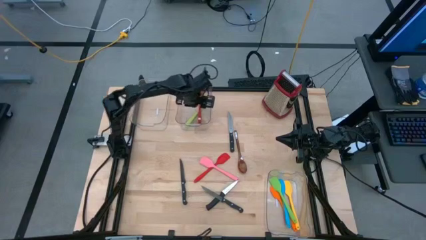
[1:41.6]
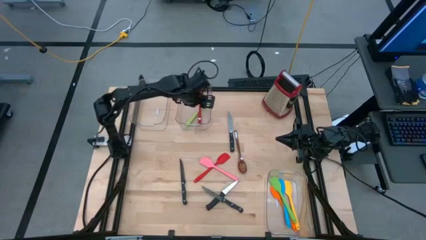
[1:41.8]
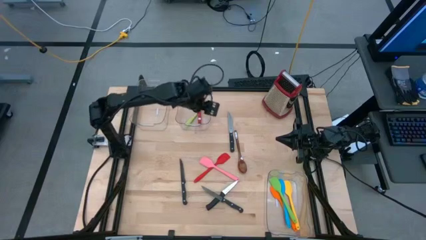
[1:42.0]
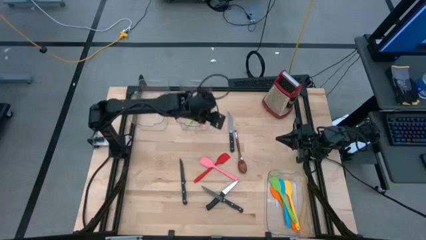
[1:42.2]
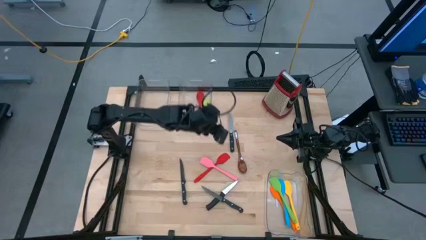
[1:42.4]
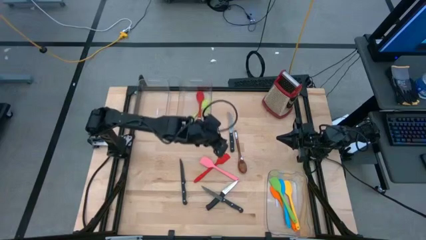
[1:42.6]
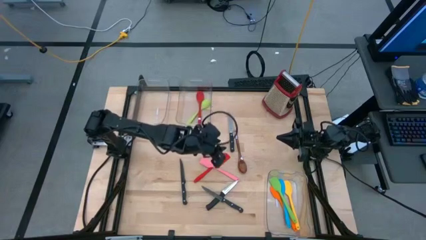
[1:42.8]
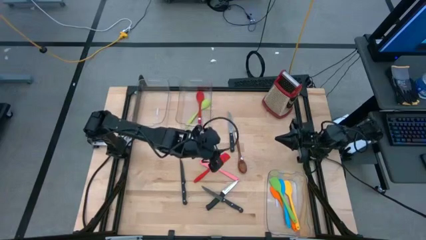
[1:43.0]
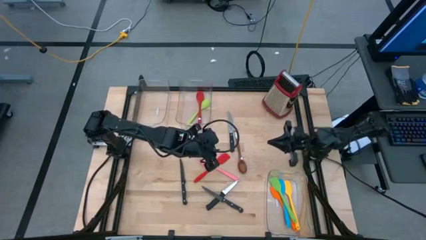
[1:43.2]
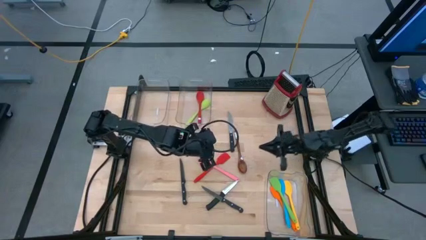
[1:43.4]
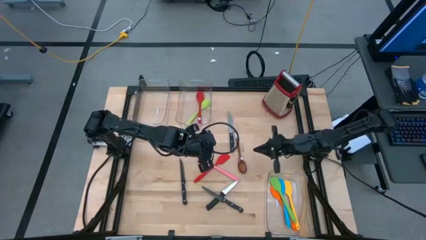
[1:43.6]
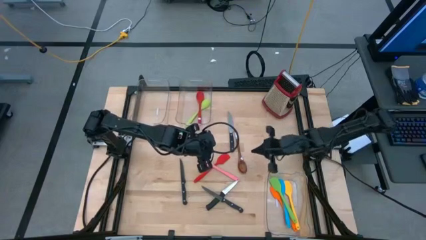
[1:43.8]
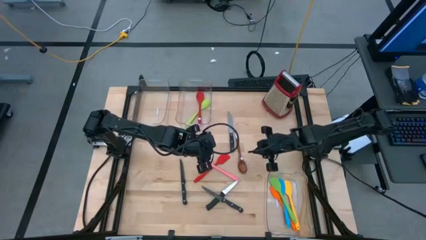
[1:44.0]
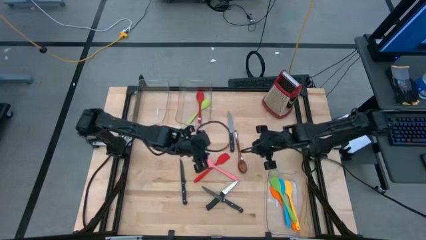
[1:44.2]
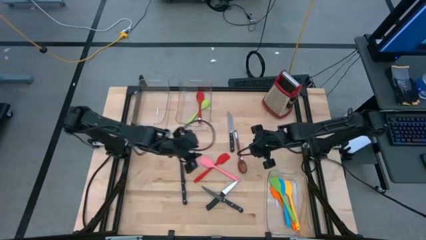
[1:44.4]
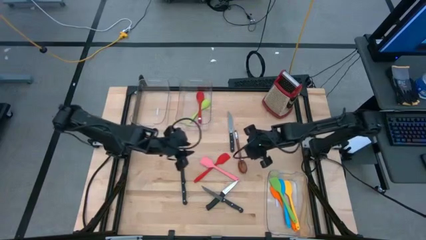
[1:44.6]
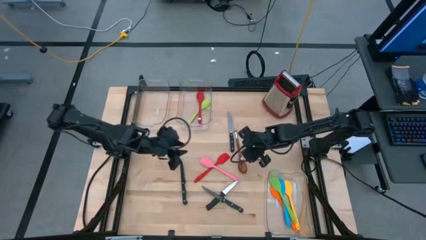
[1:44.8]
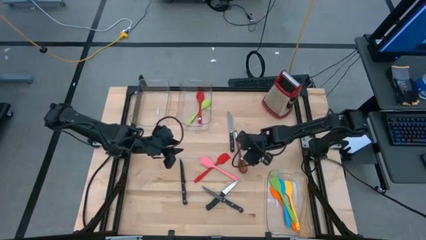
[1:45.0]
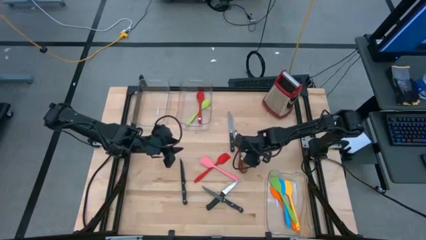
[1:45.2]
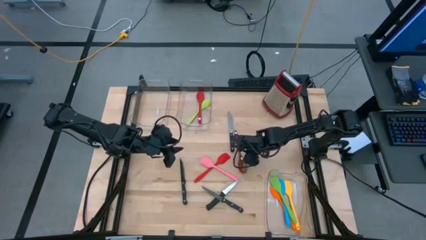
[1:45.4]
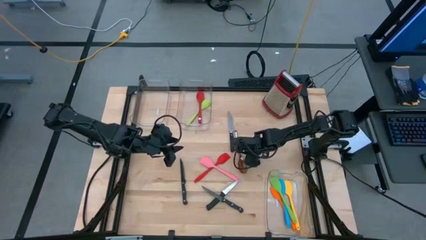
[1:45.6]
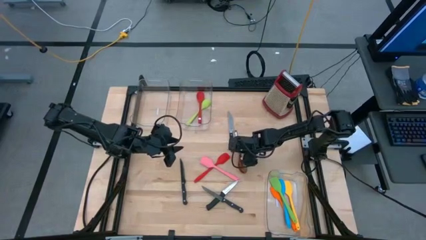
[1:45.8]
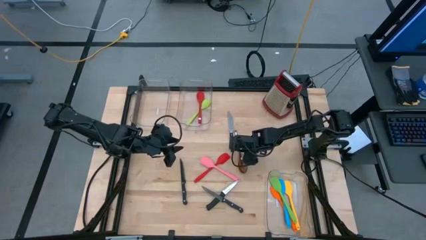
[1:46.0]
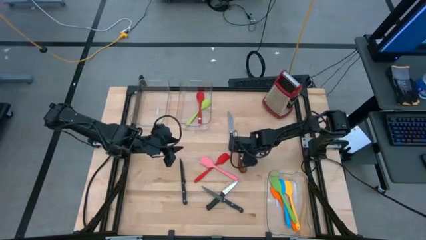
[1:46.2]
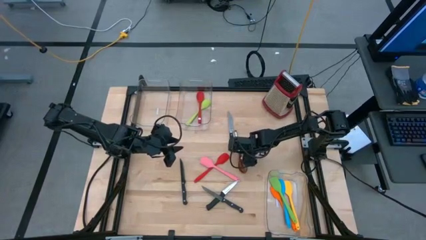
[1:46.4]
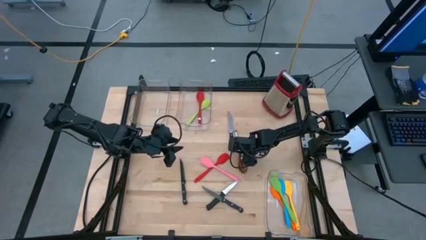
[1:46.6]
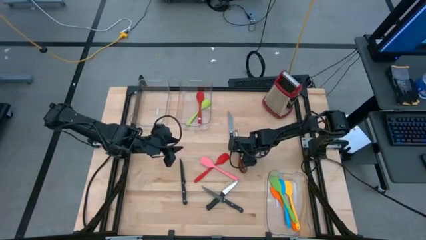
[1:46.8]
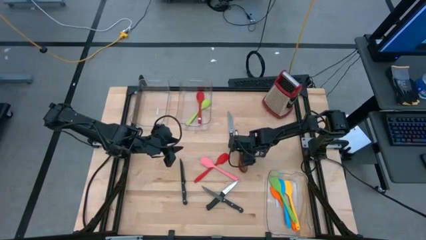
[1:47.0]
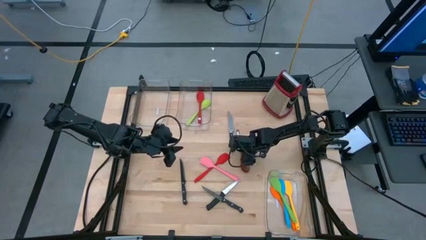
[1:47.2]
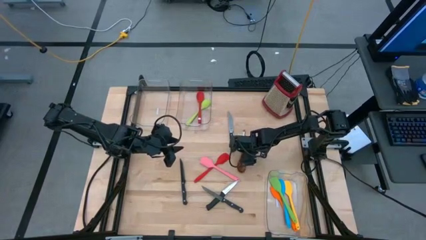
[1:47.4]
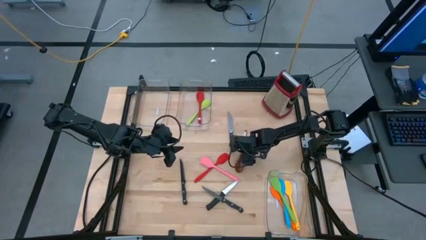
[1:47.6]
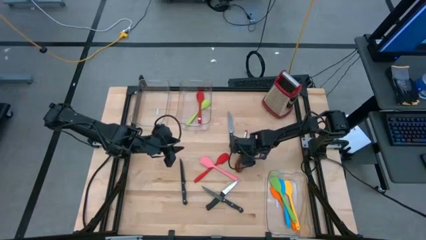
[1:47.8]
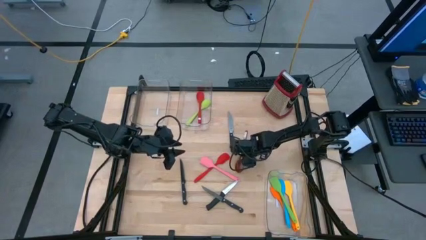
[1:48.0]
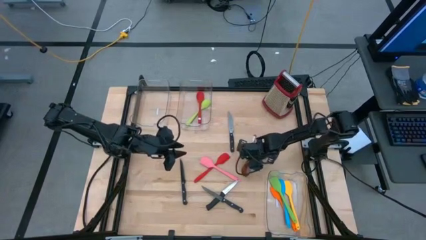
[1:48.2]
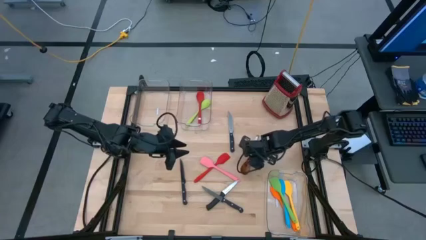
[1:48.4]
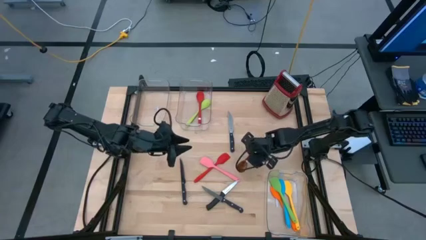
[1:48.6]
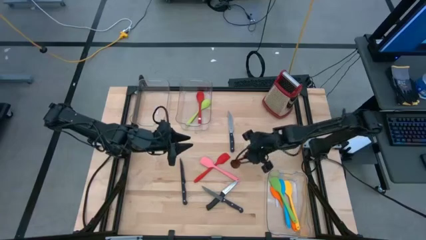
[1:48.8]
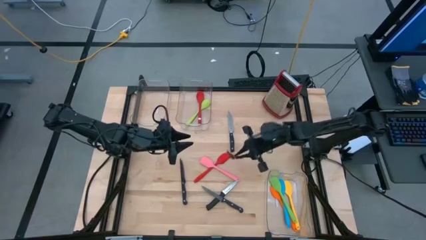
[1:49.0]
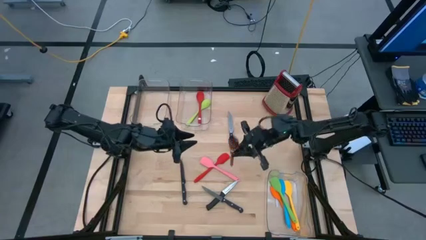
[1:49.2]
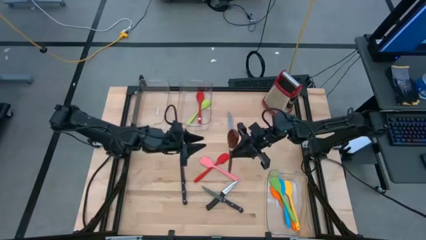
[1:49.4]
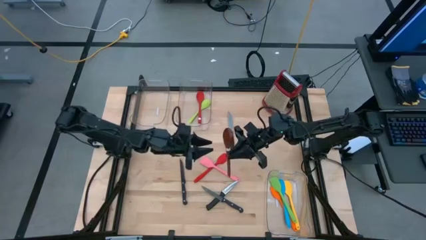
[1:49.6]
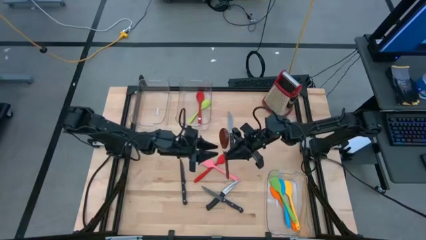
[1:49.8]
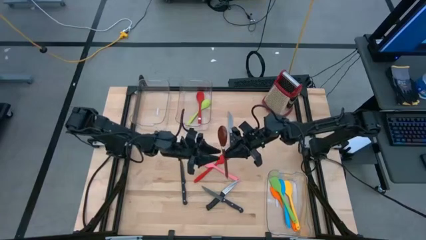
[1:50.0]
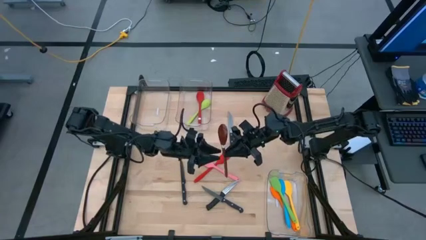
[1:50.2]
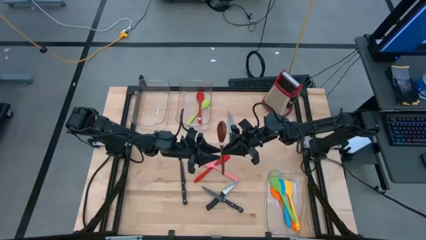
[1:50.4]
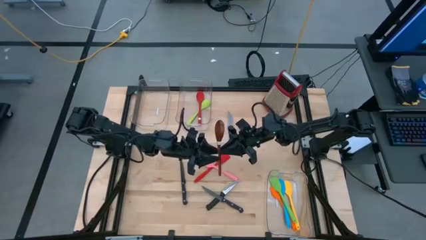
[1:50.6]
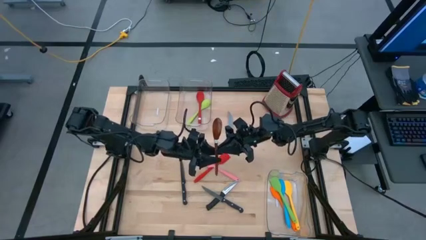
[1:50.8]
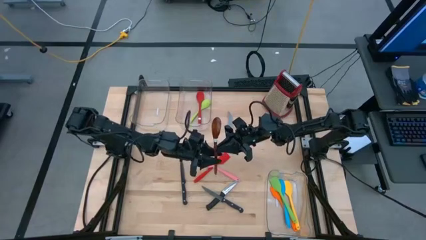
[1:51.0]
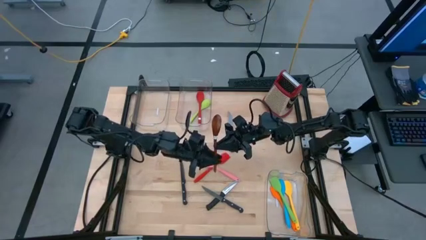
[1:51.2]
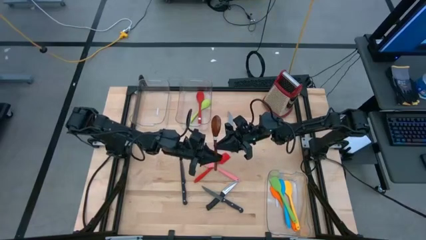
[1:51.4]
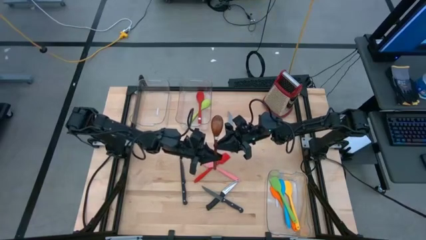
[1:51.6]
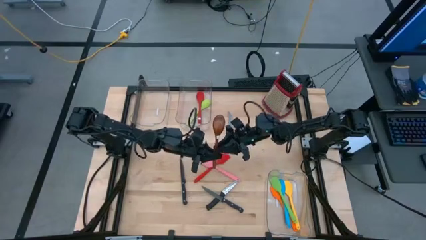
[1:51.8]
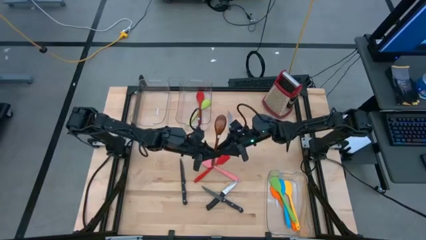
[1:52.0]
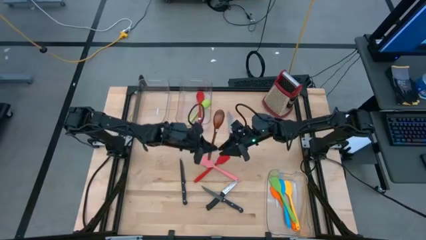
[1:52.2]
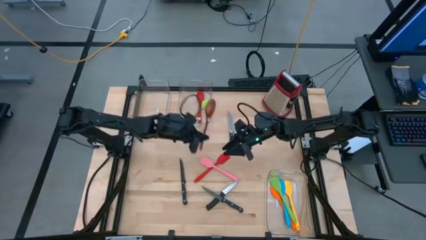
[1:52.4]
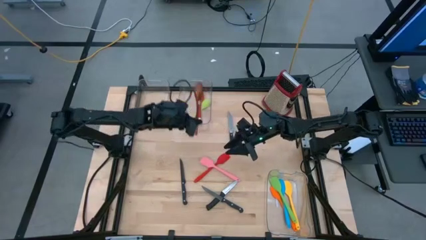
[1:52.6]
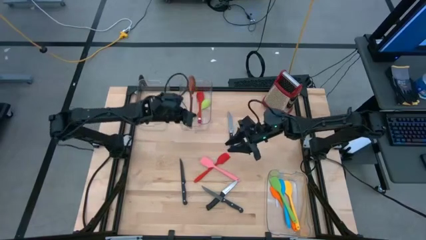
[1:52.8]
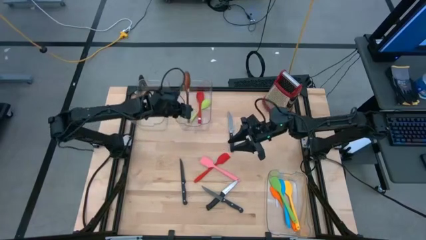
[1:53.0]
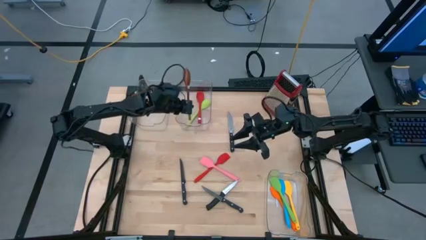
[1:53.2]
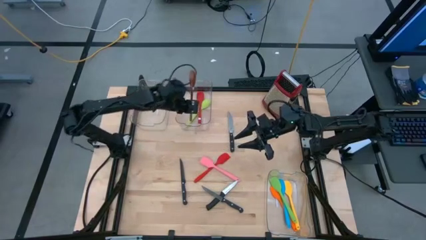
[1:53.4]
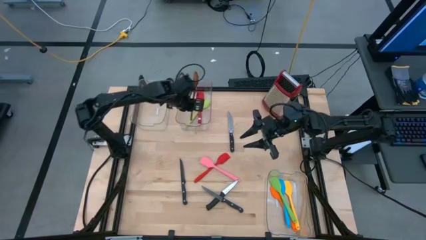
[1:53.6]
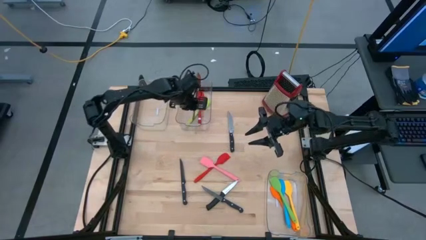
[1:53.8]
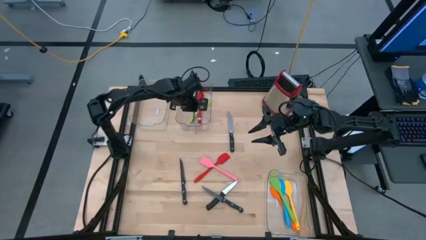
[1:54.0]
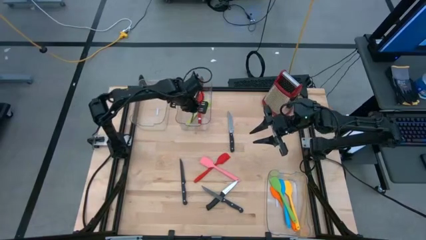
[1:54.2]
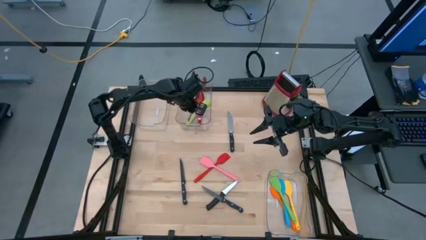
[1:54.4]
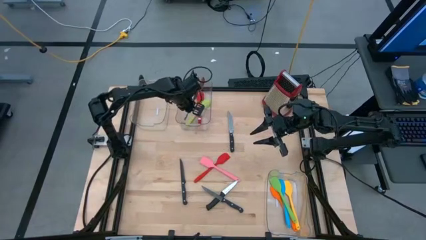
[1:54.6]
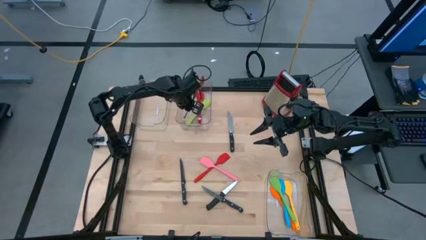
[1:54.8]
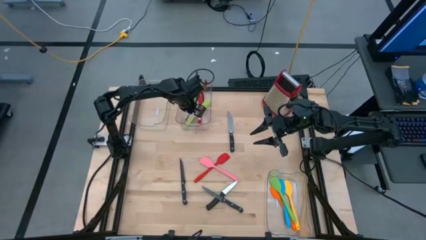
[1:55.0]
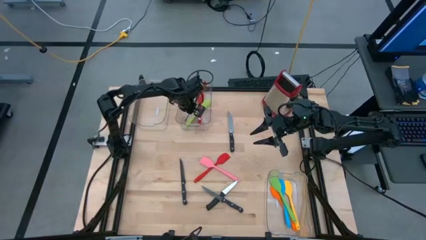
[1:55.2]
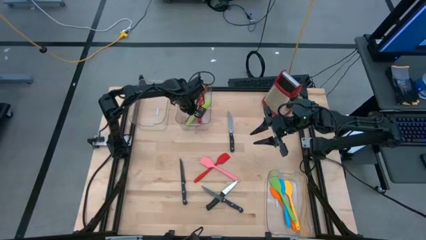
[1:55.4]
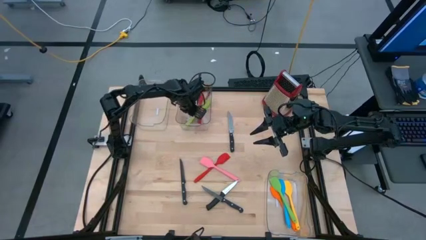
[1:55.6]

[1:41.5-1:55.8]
Task: Pick & Place Kitchen Items
Put the brown serving spoon into the top right transparent bin
